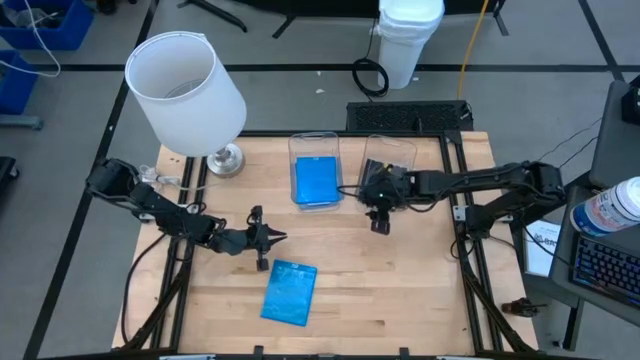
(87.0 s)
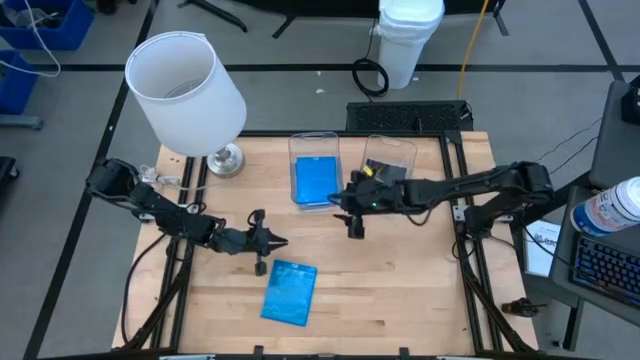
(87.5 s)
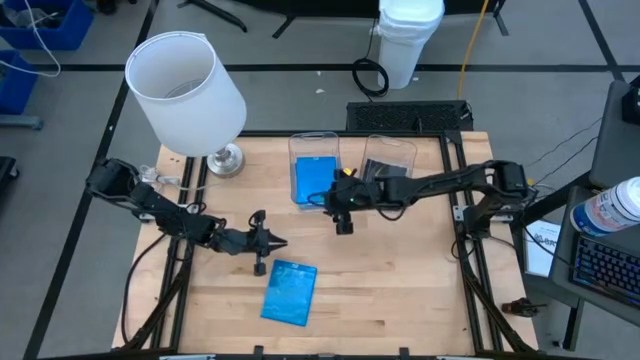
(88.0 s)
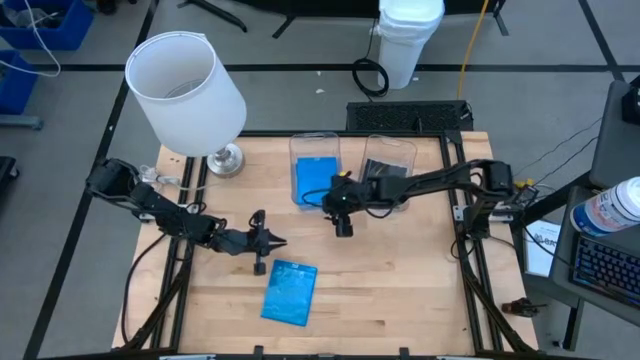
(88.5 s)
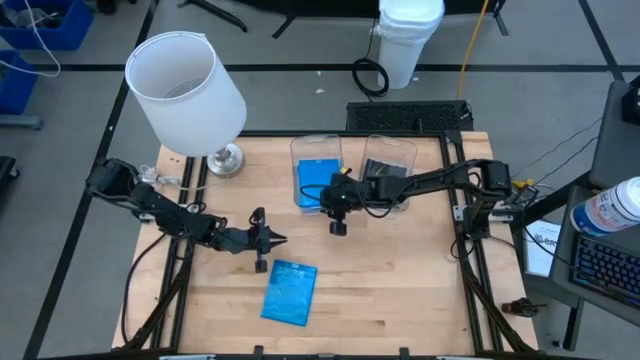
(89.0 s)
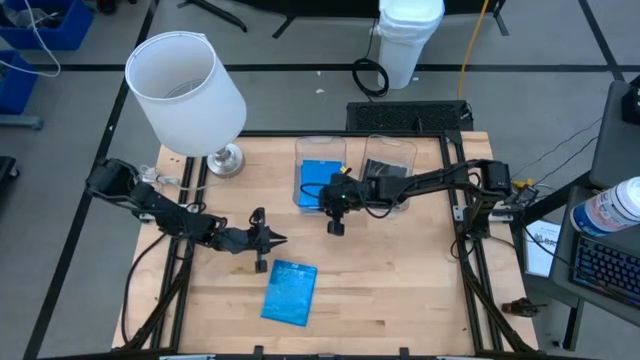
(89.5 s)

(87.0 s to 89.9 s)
Task: Pick & place jewel cases by type
Adjust the left transparent bin

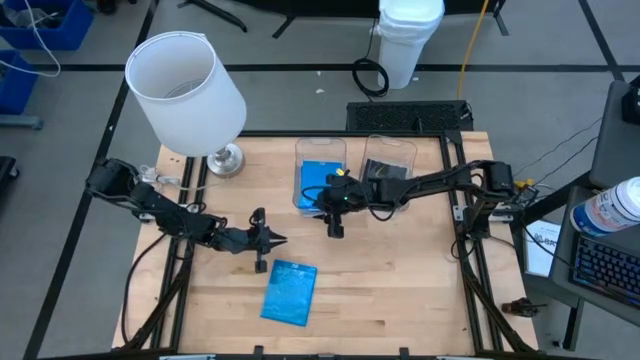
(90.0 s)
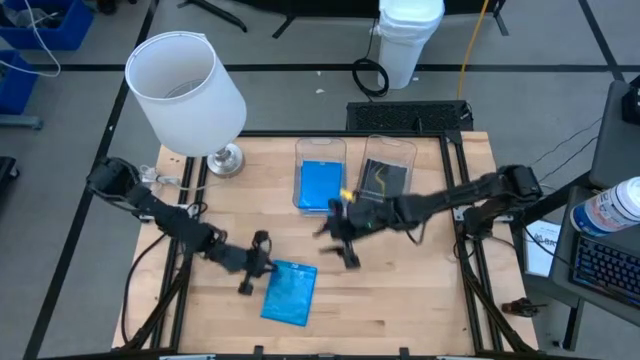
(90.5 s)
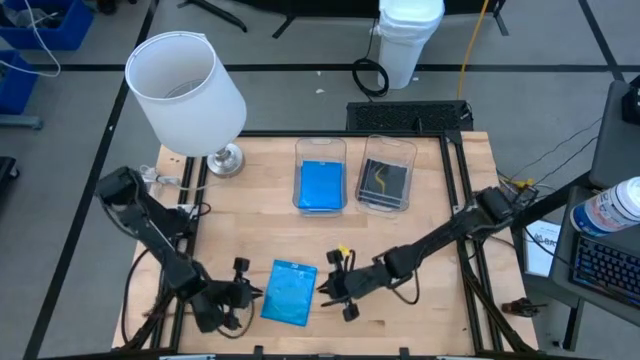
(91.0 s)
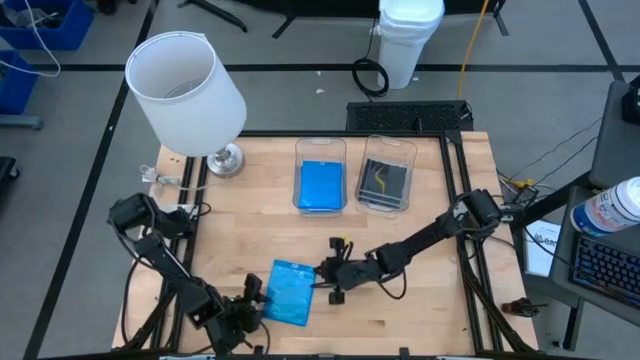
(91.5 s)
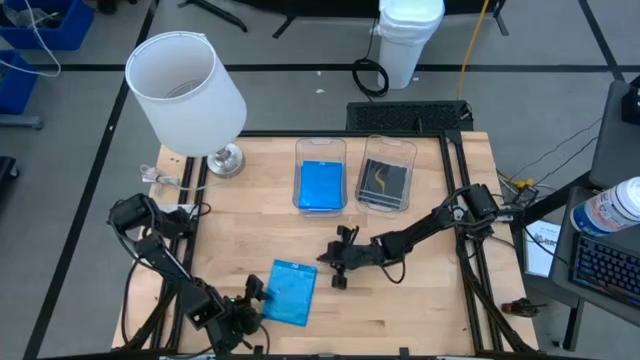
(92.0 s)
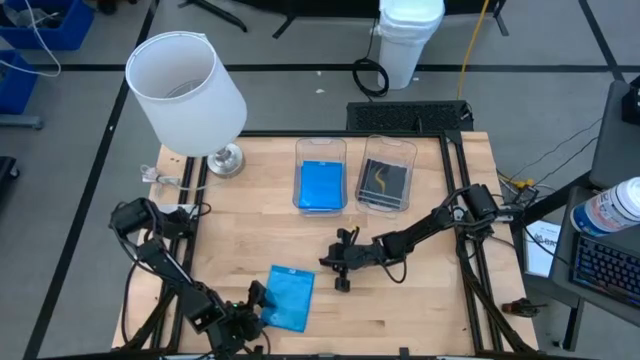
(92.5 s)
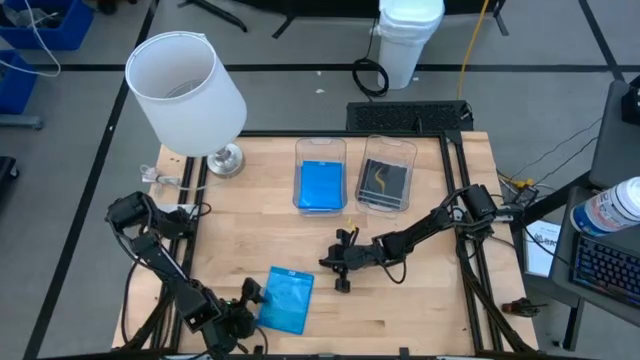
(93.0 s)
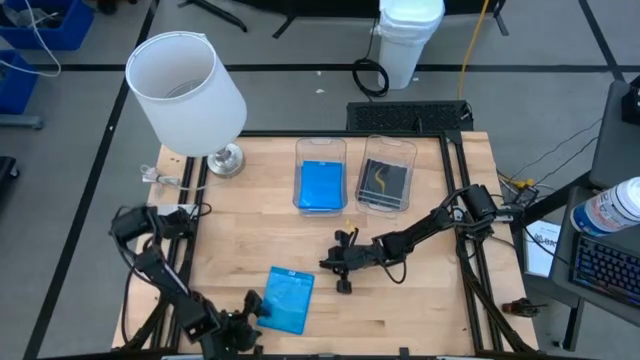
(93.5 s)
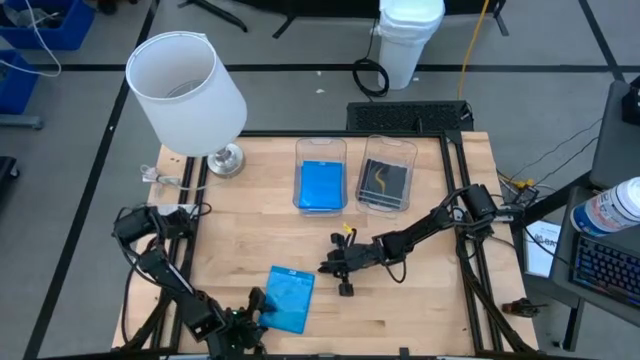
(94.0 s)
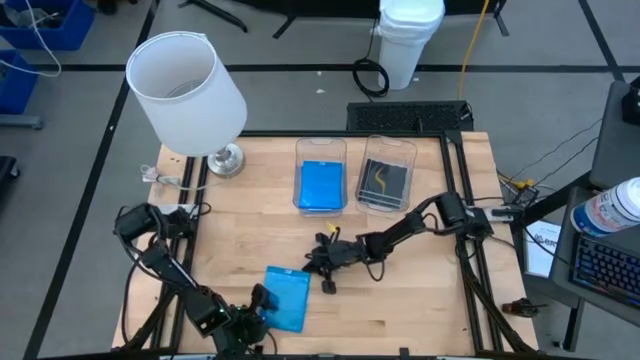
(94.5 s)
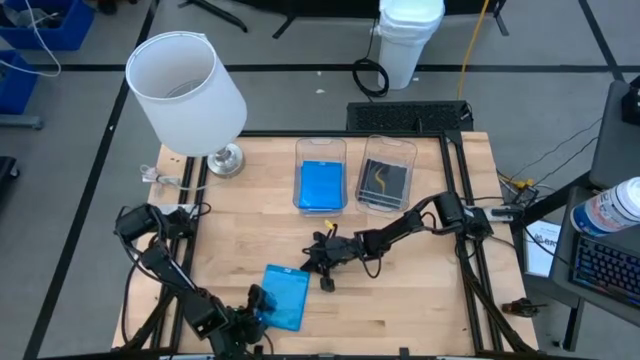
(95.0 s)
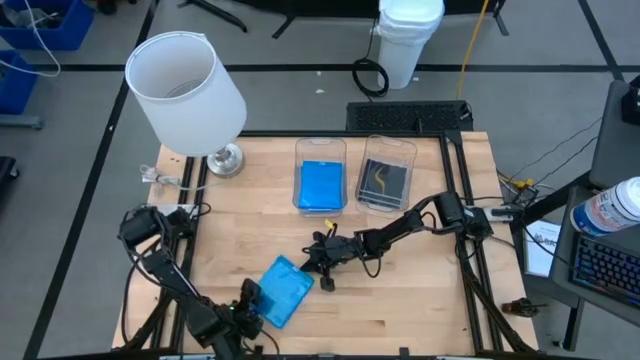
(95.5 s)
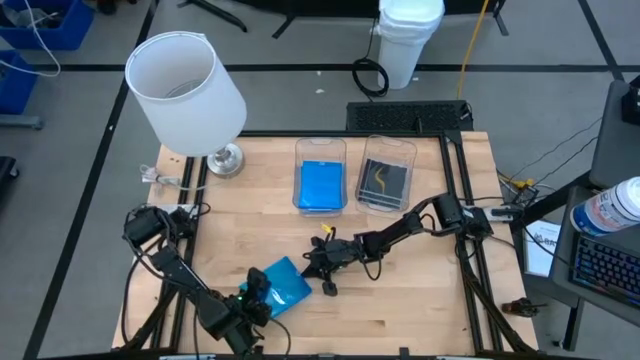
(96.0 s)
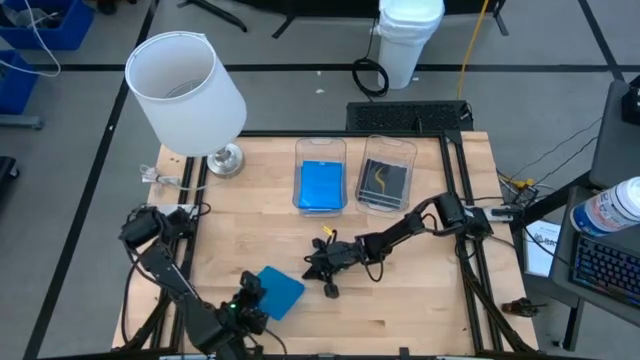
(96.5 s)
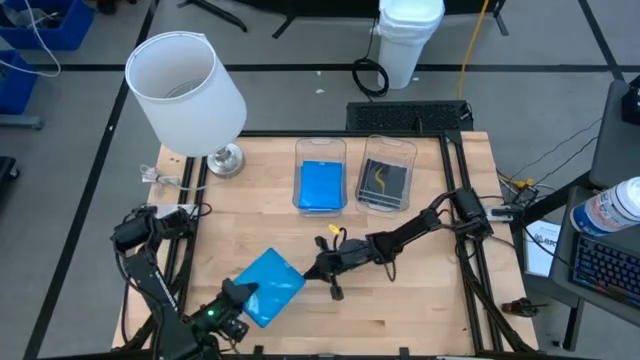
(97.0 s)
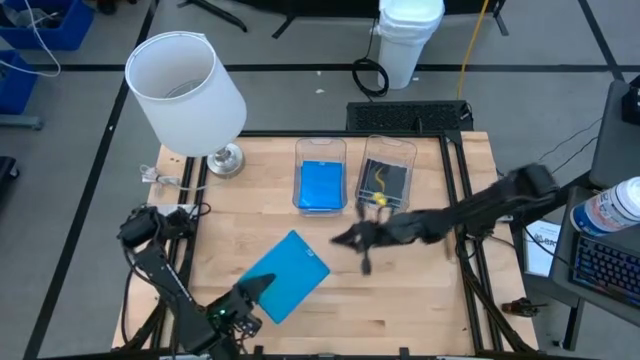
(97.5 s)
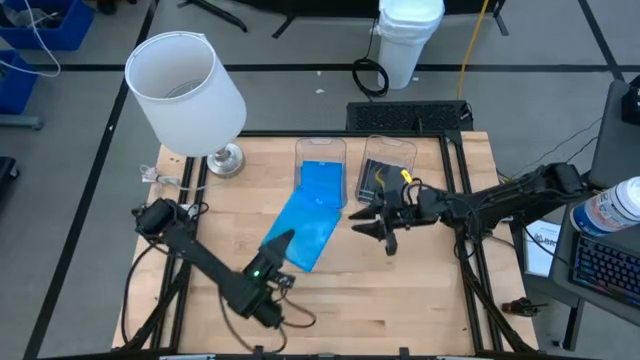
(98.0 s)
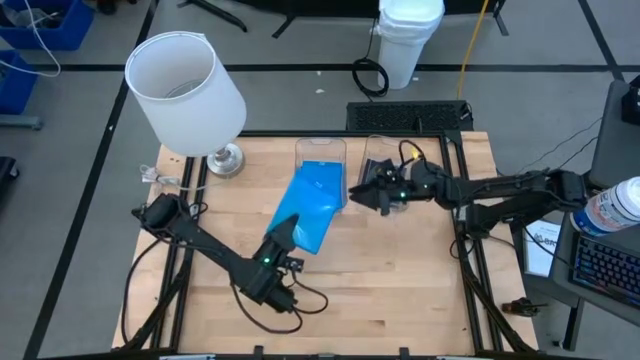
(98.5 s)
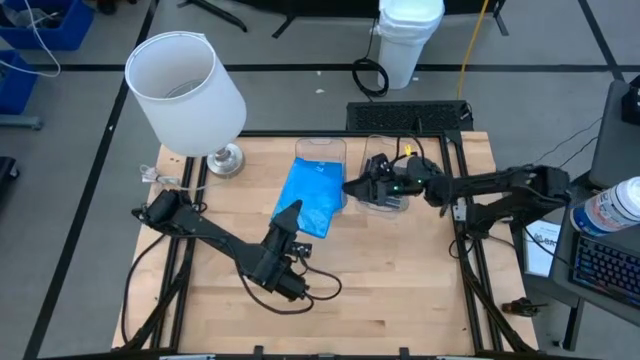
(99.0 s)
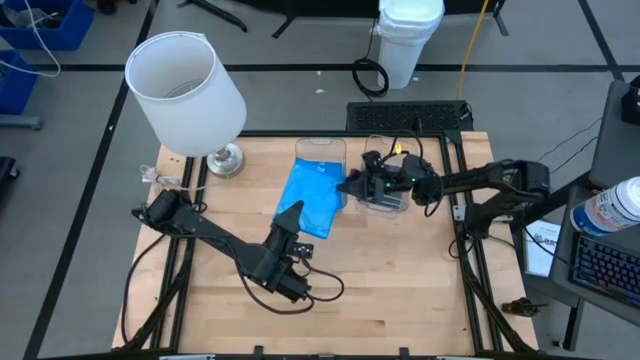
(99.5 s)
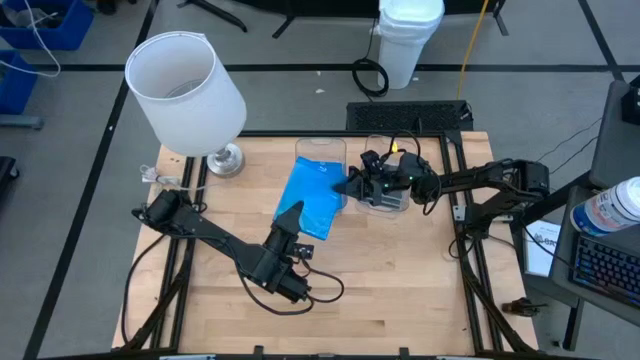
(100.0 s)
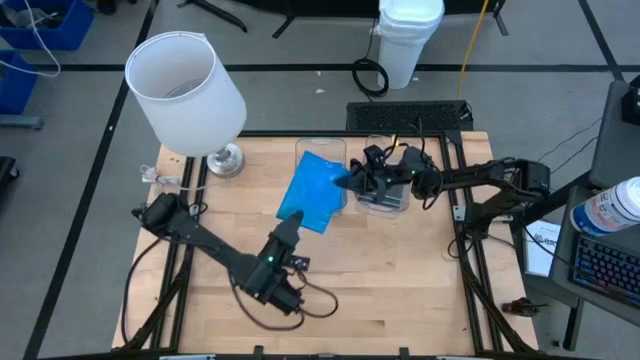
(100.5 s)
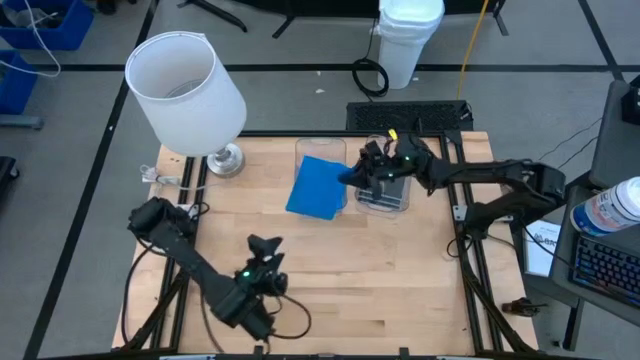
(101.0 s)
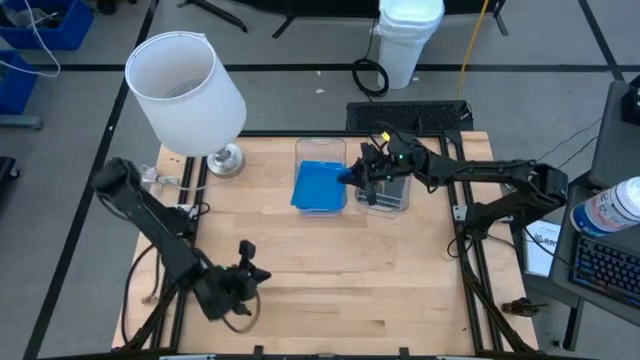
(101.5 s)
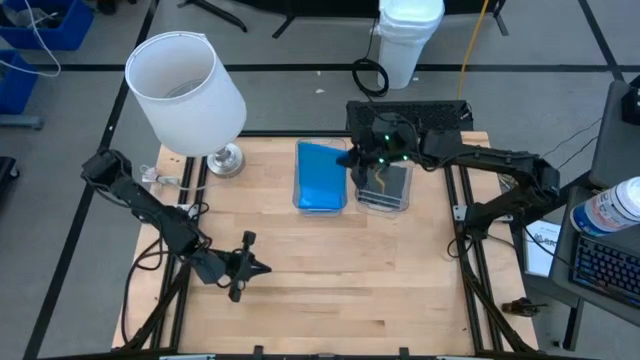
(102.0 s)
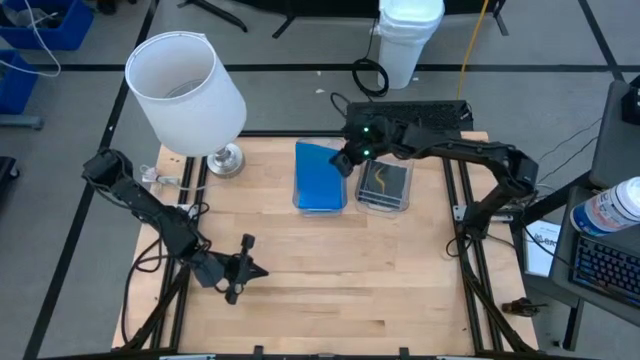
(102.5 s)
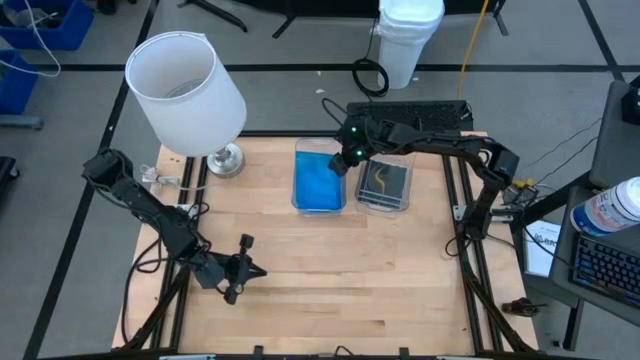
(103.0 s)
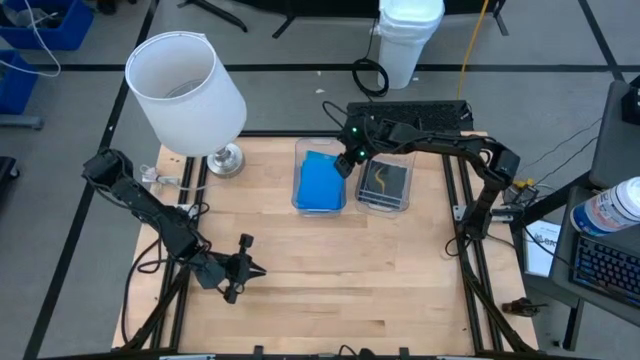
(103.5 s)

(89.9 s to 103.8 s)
Put the blue CD case into the left transparent bin

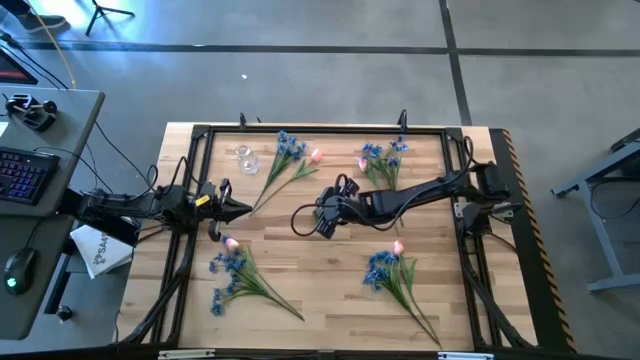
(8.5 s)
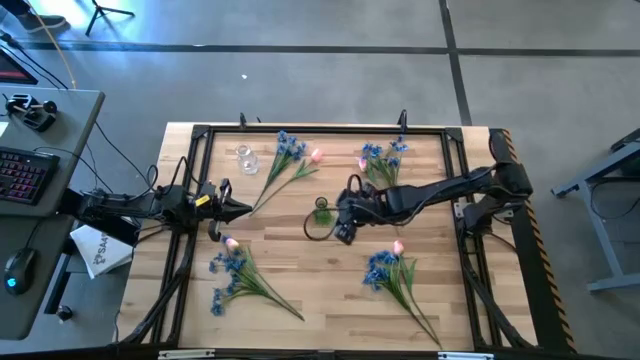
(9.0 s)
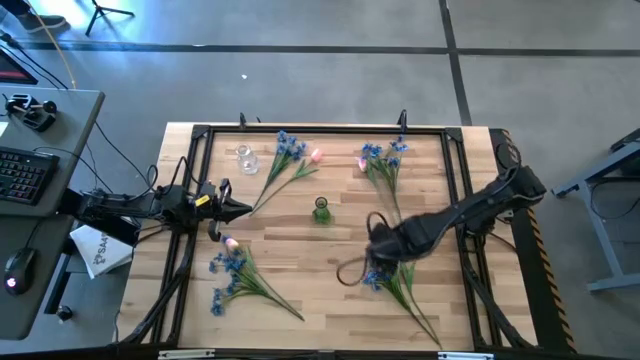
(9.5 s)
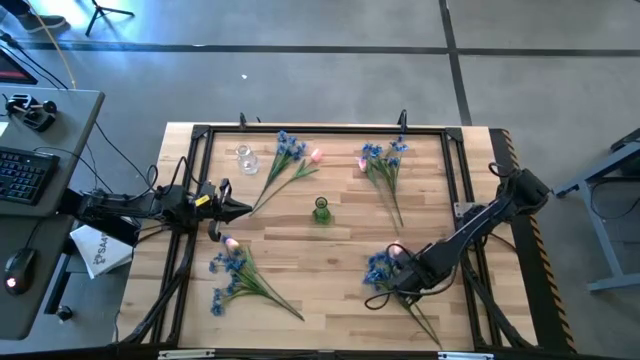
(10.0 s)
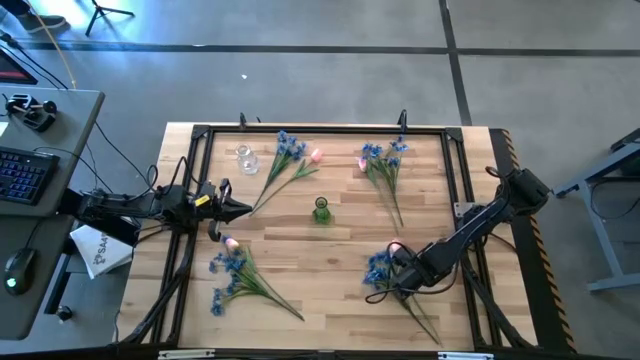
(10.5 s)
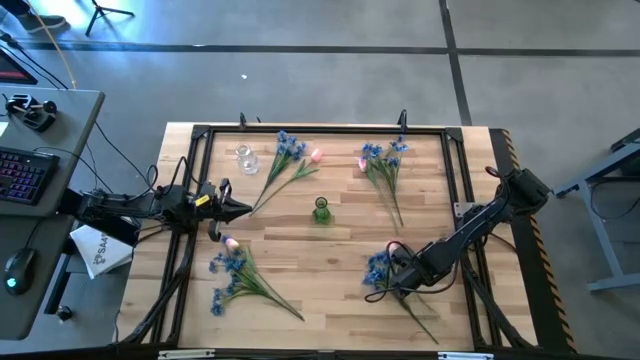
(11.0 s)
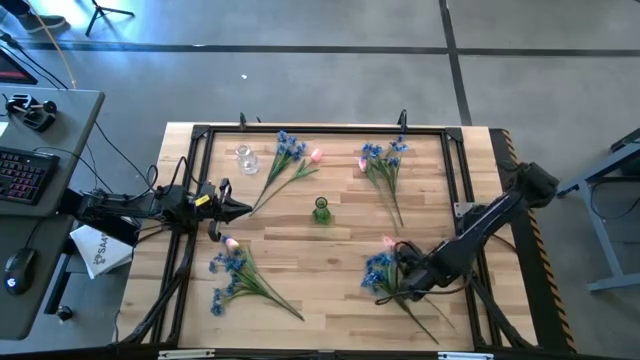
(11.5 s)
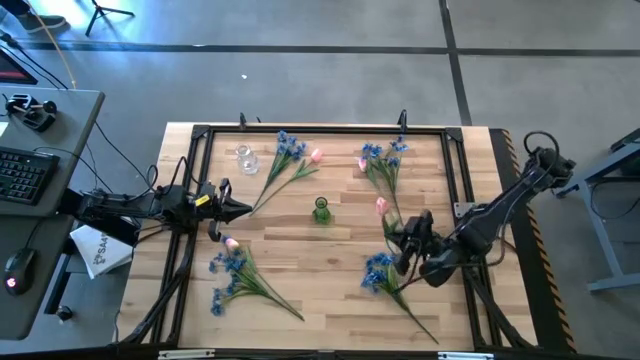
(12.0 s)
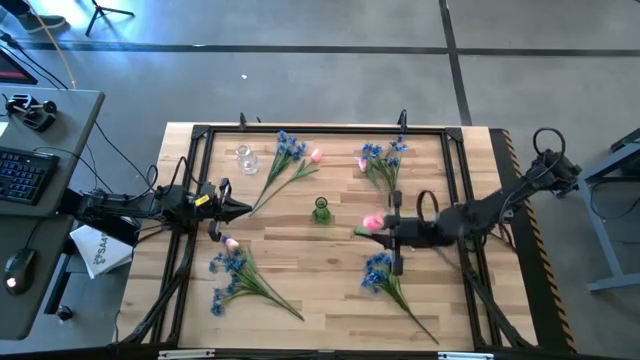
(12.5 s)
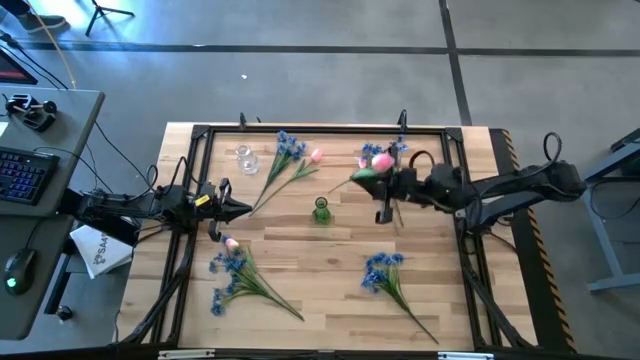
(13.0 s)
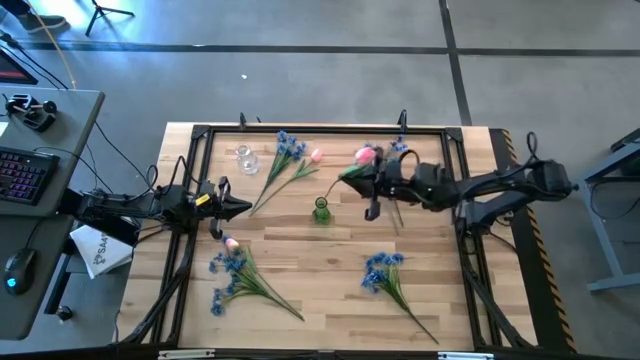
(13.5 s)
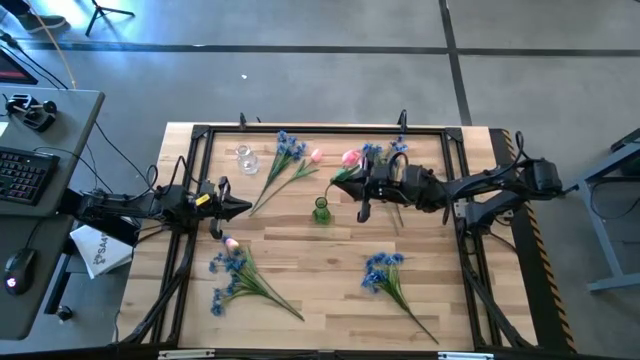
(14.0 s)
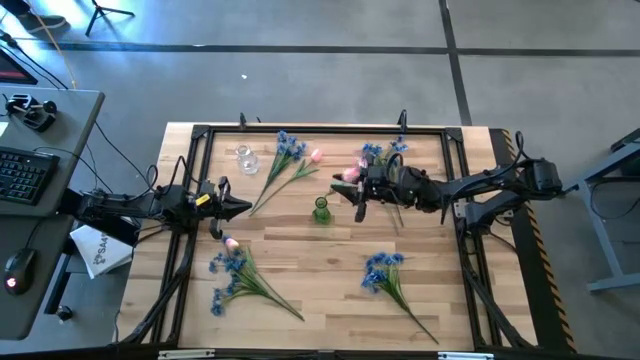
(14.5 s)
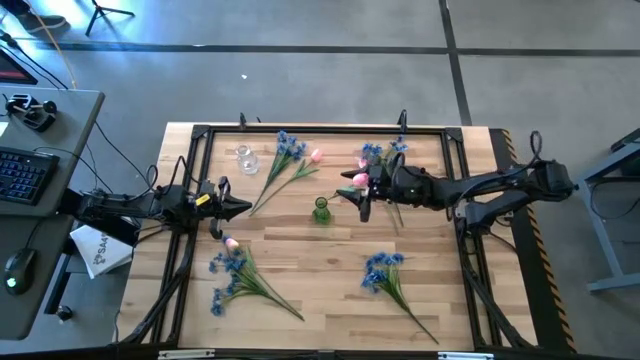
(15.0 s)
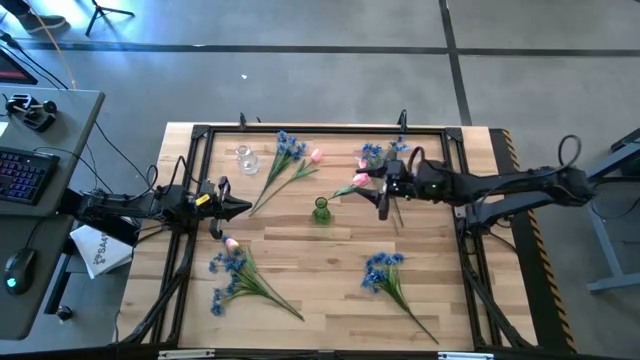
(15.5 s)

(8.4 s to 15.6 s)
Task: Sort flowers into vase by color
Put the pink tulip into the green vase
